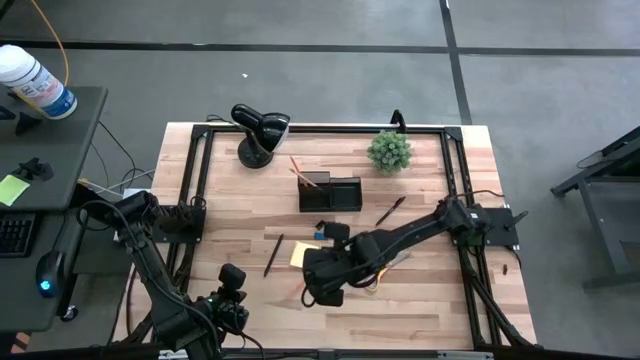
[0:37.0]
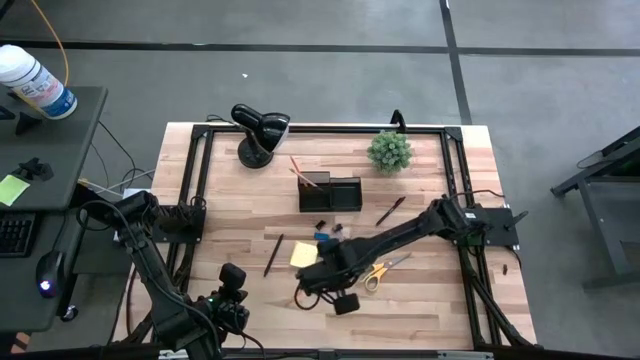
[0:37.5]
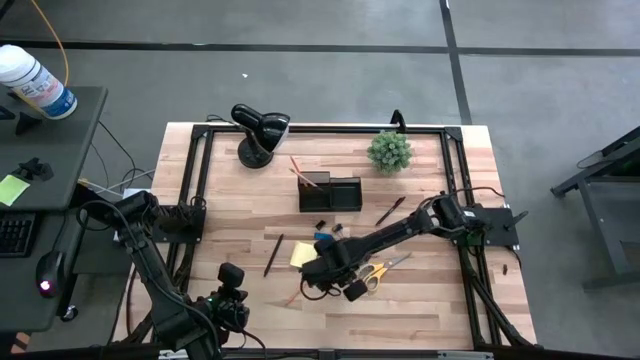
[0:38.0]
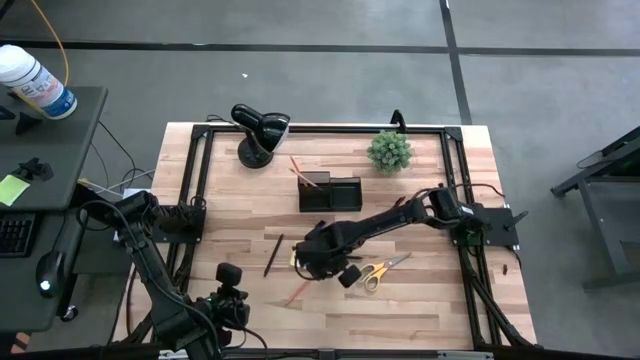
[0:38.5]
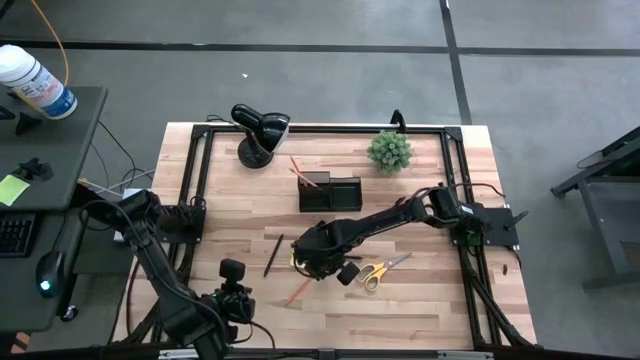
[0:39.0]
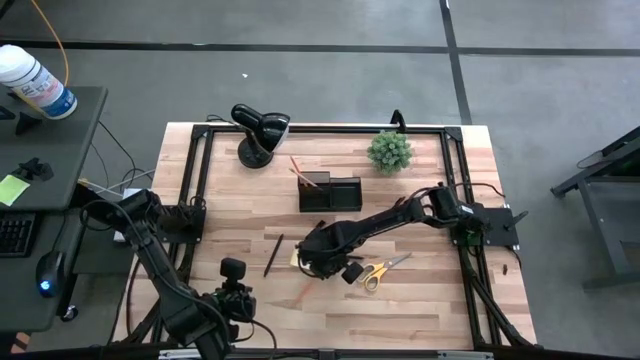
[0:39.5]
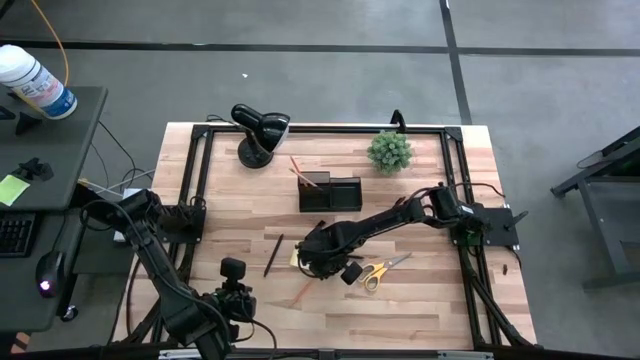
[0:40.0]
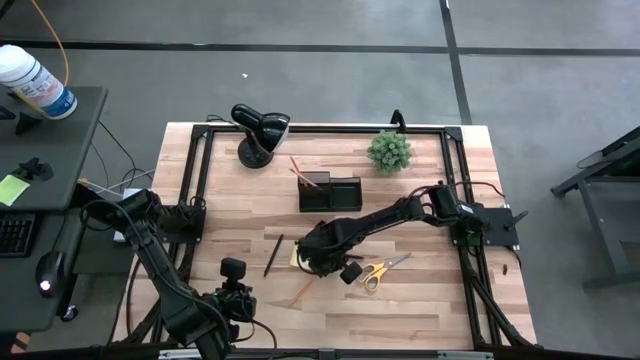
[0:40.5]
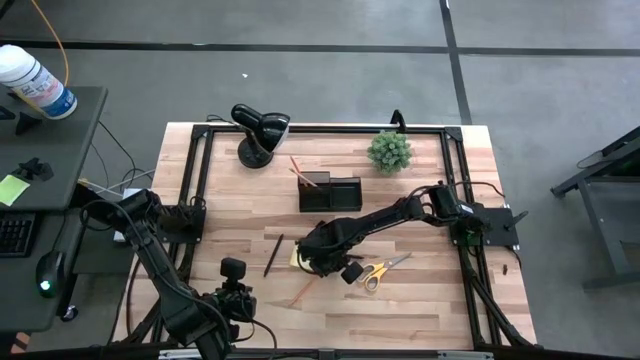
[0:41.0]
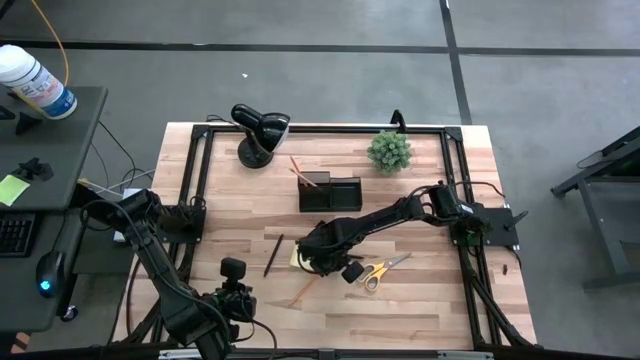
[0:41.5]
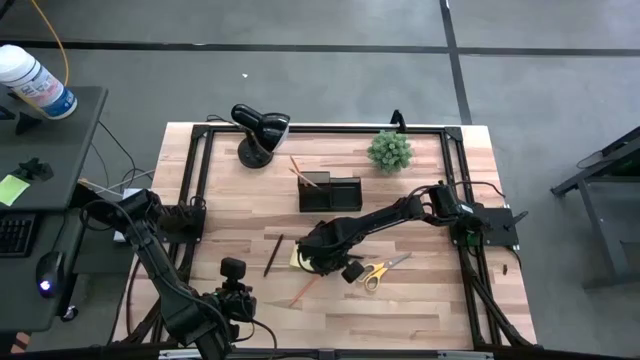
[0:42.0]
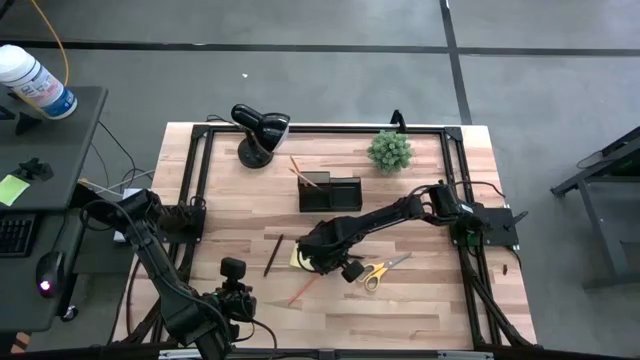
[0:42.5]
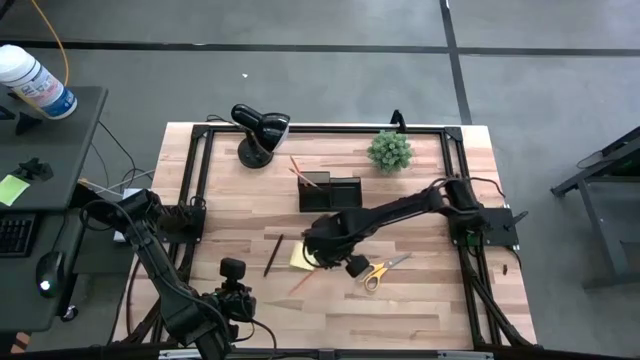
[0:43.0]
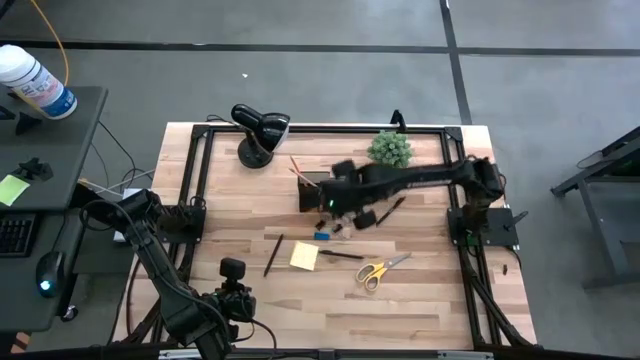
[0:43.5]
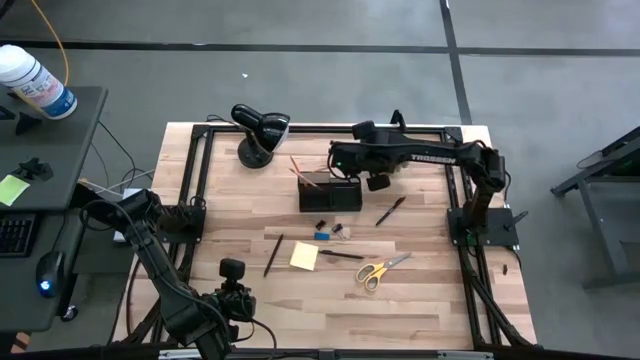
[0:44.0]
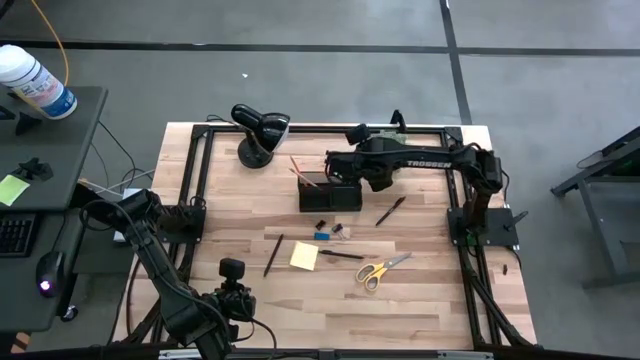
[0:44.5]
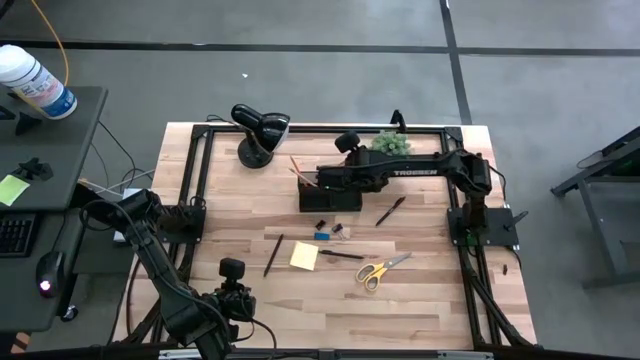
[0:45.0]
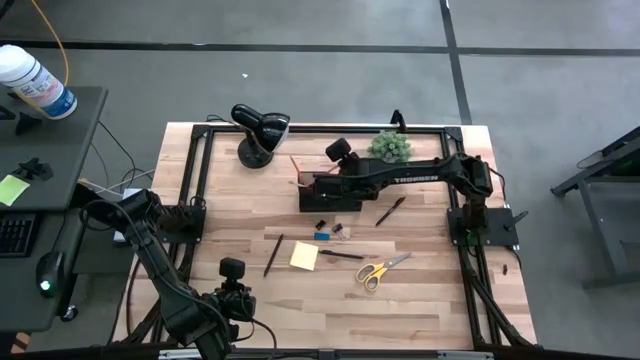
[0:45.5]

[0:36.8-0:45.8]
Task: Pick and place office supplies into organizer
Put the orange pencil into the black desk organizer

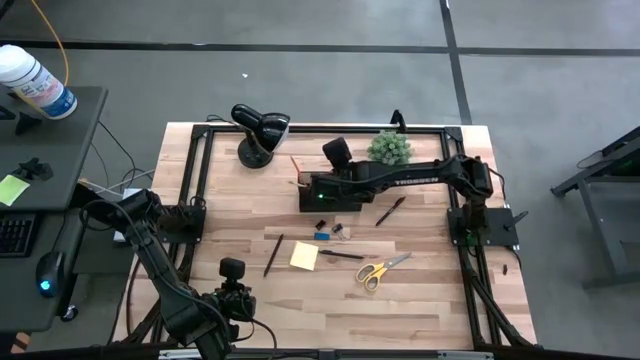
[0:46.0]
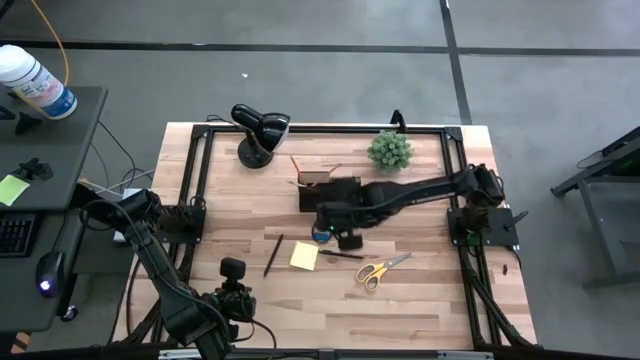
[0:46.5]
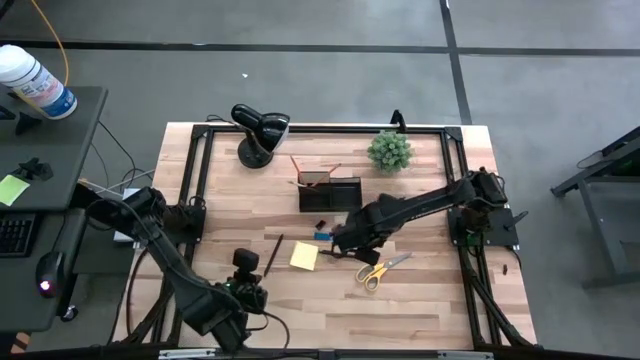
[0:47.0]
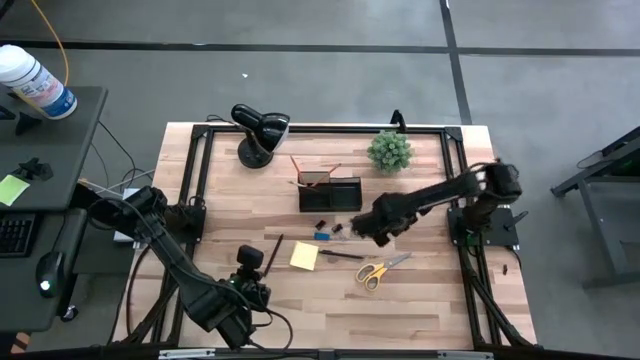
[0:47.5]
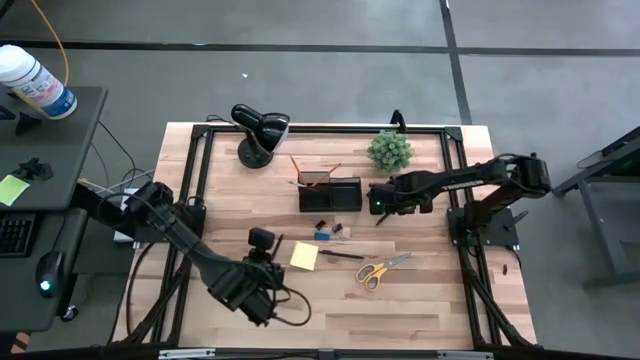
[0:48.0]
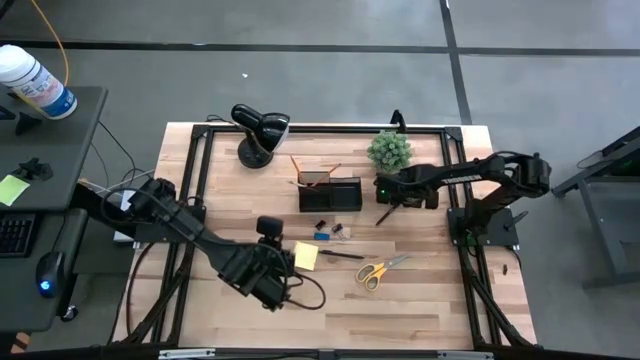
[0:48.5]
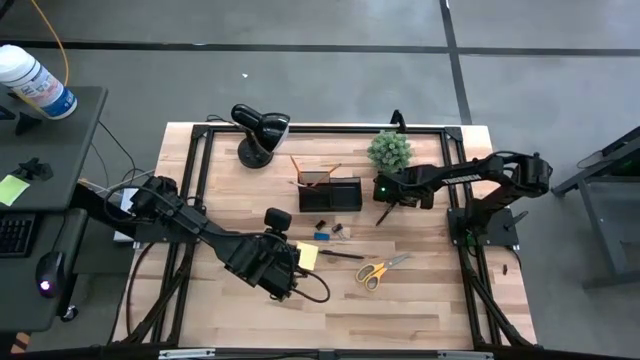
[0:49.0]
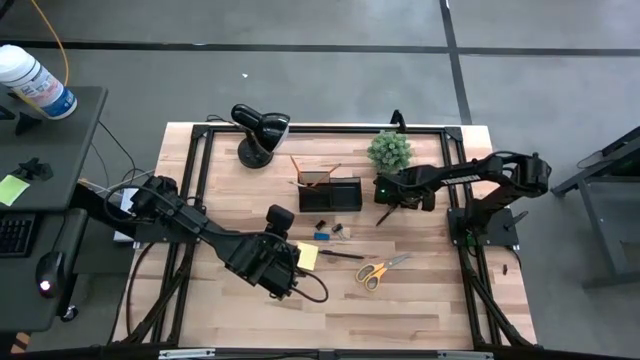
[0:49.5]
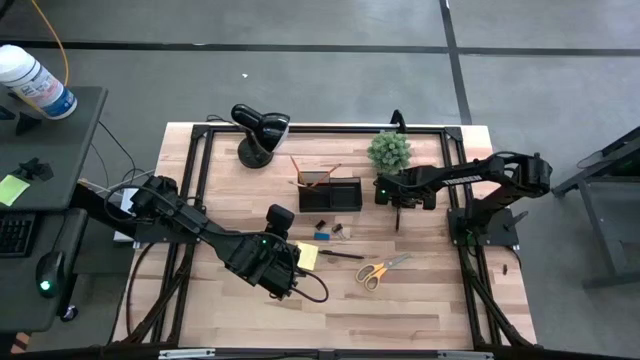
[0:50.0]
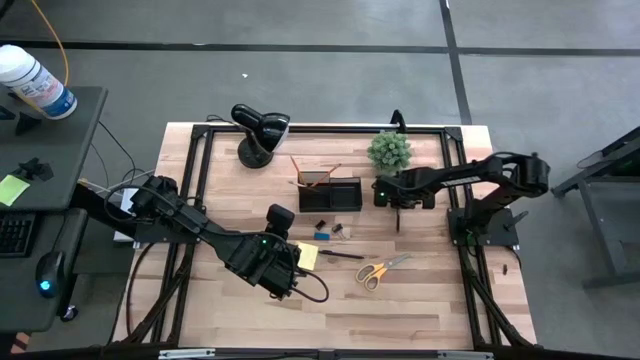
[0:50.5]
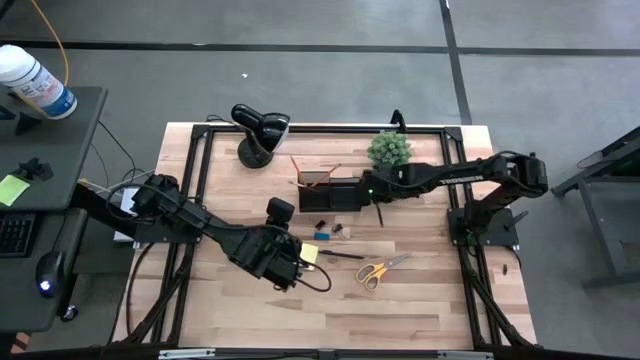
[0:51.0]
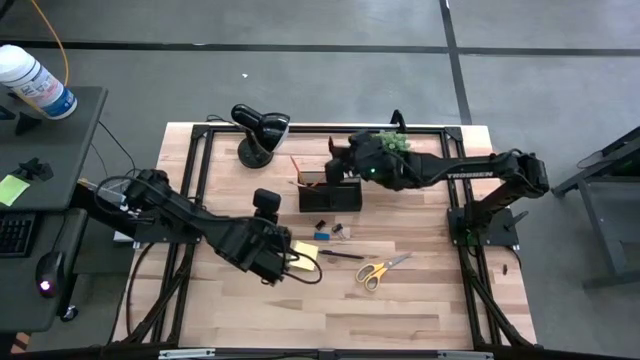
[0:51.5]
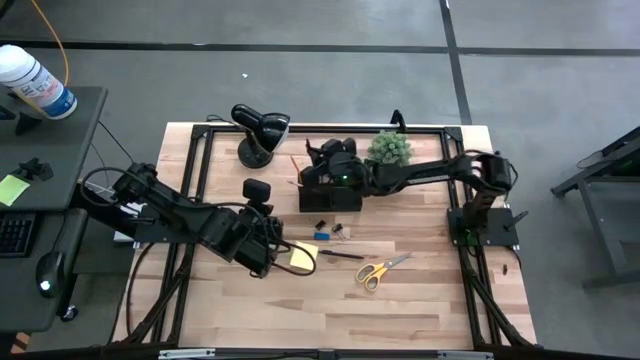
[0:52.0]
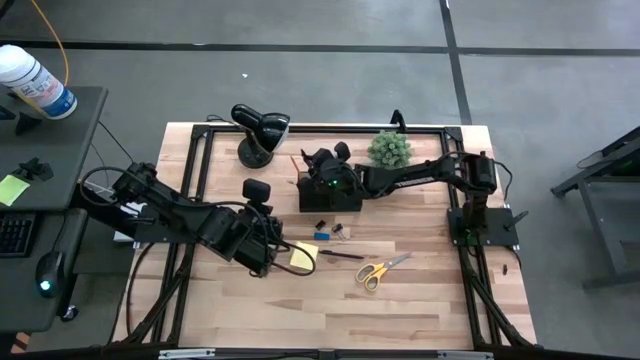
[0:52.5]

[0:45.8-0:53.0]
Put the top black pen into the black desk organizer

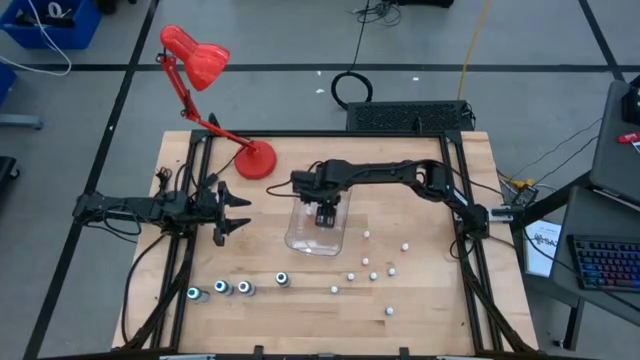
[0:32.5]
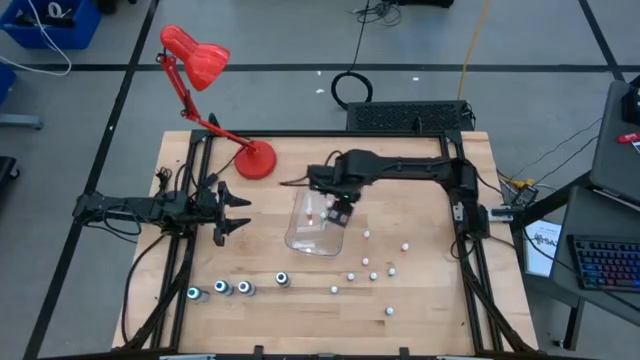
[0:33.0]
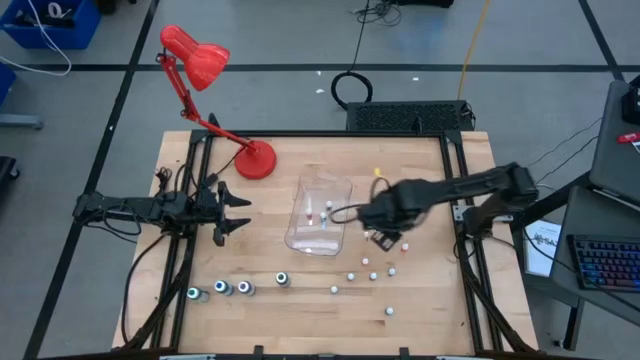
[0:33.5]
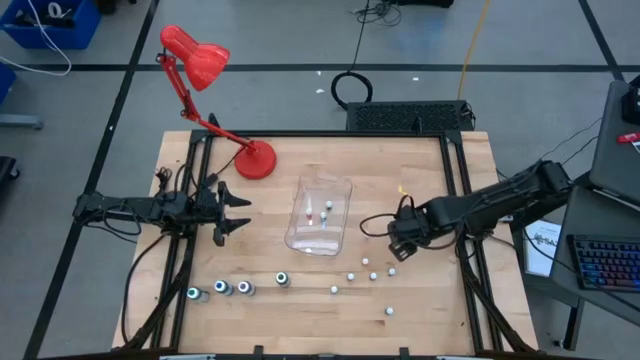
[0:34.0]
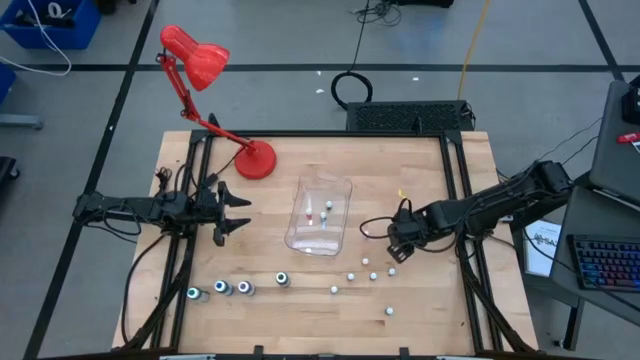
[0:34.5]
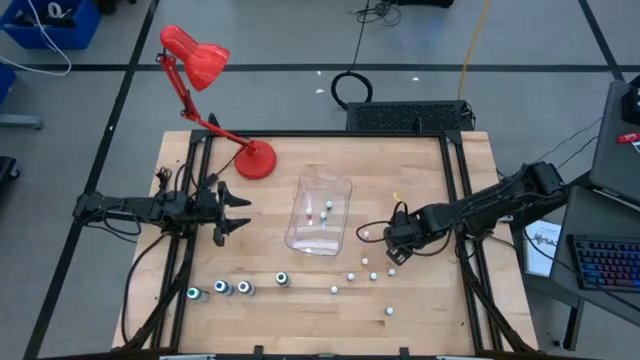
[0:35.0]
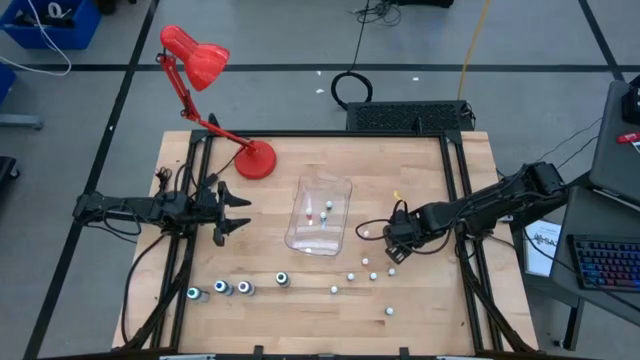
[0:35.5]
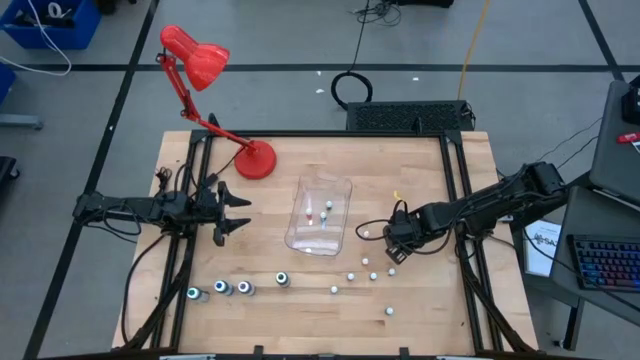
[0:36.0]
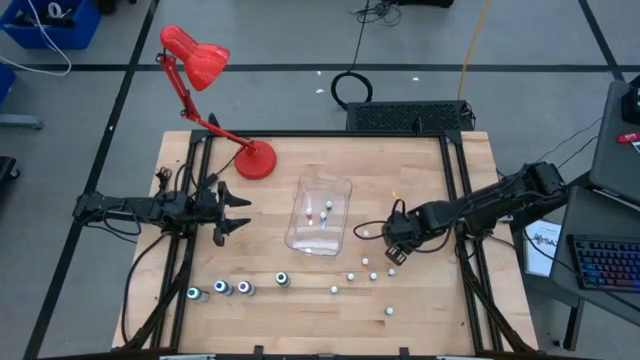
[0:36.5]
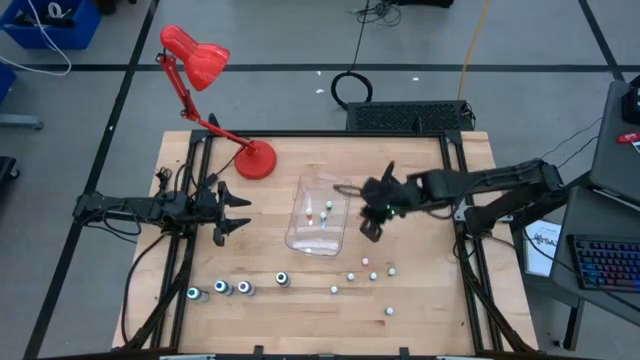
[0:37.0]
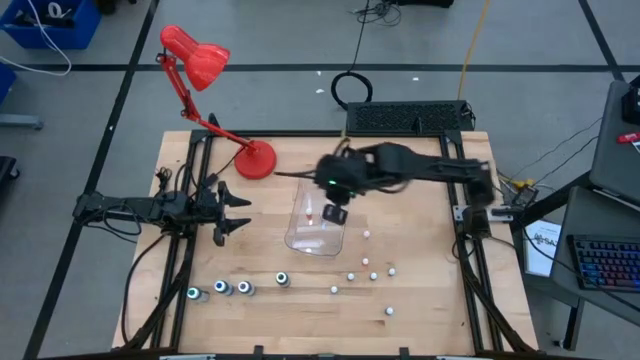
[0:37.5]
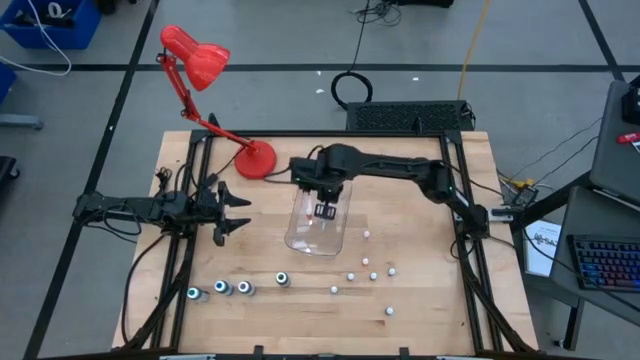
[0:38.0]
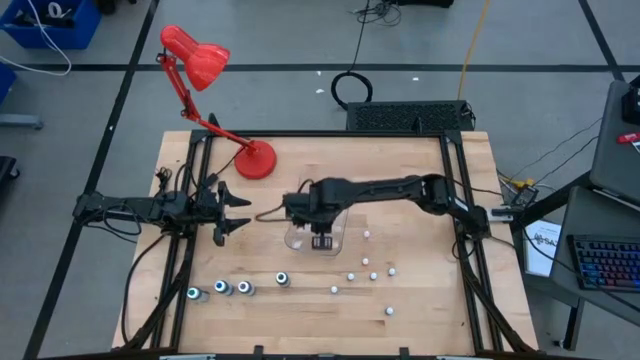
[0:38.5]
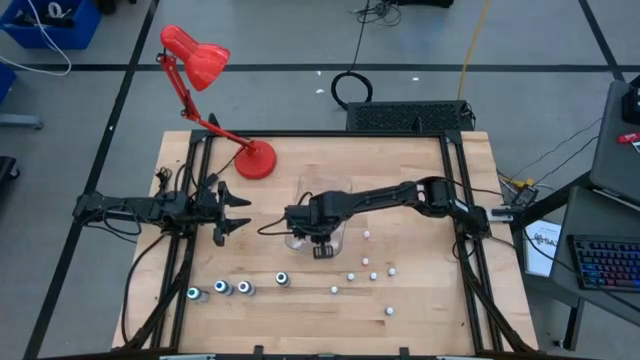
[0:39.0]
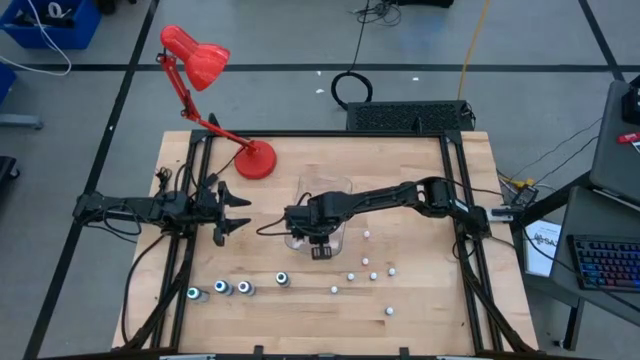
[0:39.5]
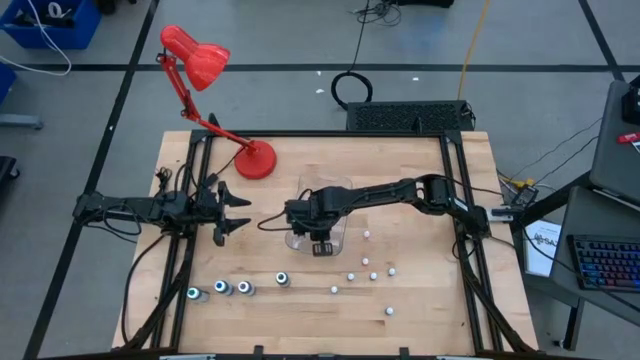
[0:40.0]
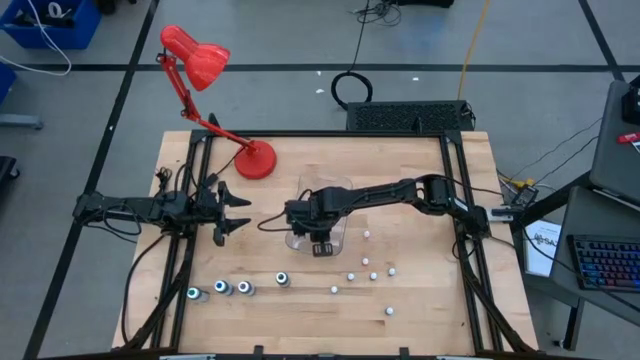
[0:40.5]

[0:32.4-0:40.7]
Task: Pick & Place food coloring
Put the small orange food coloring bottle into the transparent bin
